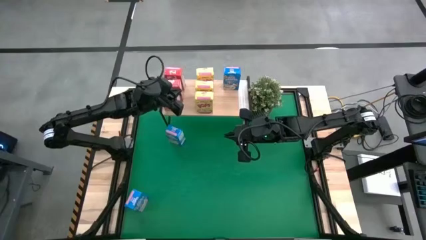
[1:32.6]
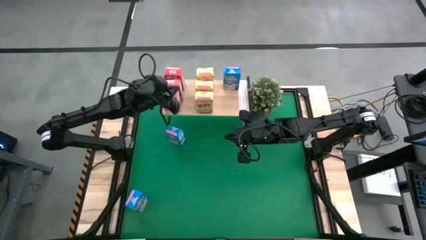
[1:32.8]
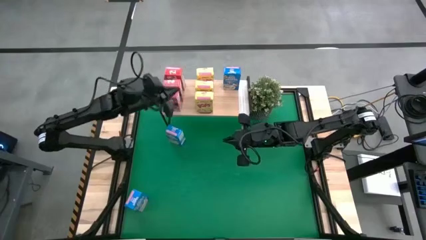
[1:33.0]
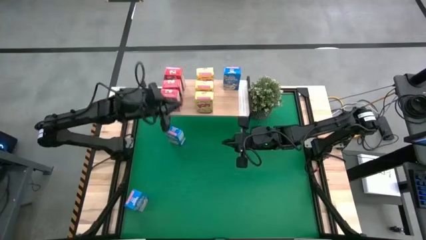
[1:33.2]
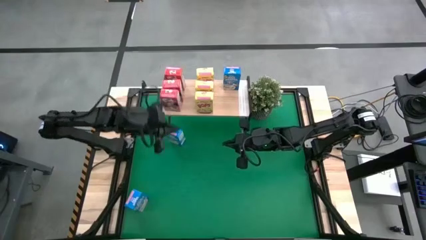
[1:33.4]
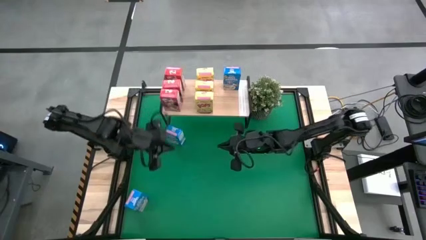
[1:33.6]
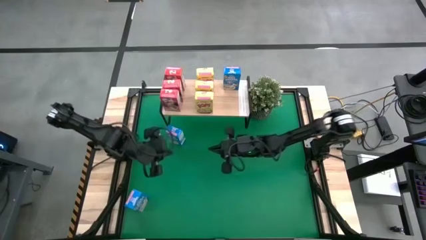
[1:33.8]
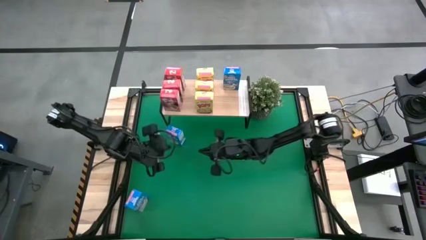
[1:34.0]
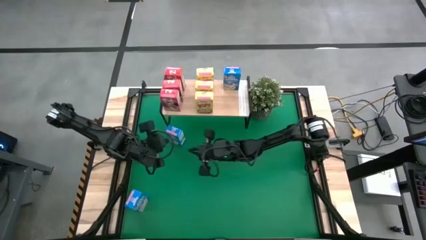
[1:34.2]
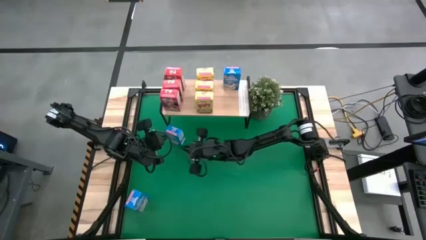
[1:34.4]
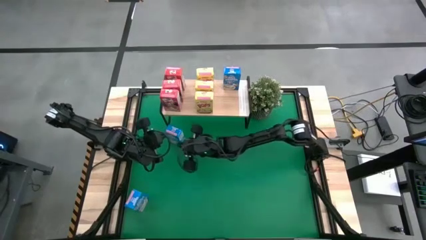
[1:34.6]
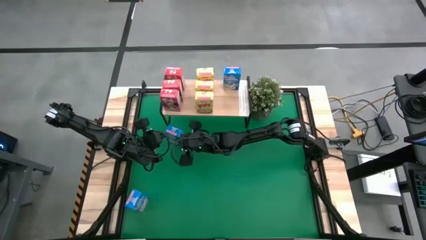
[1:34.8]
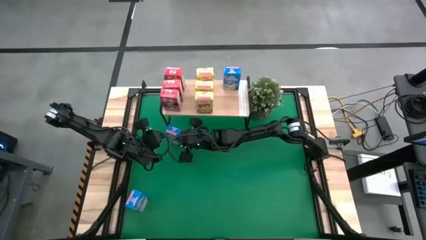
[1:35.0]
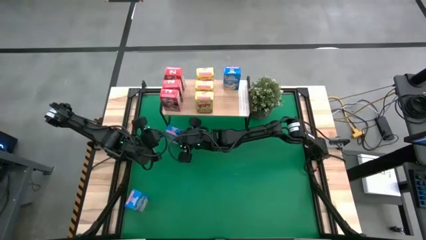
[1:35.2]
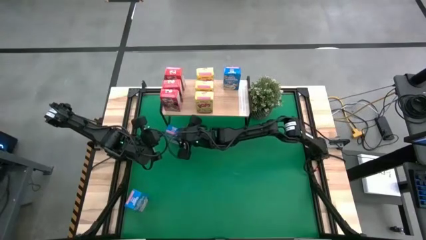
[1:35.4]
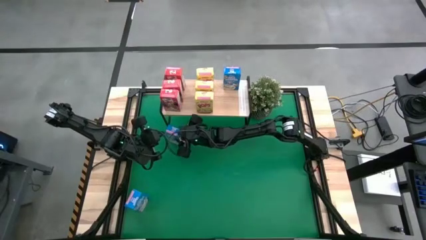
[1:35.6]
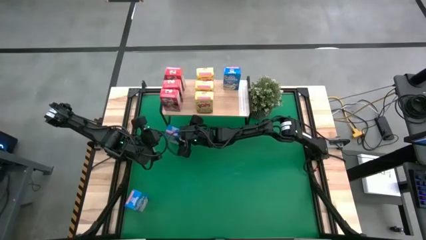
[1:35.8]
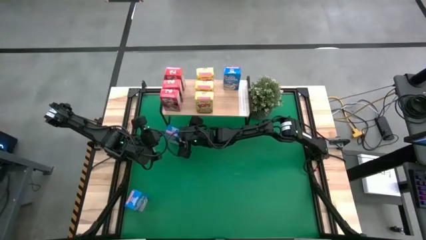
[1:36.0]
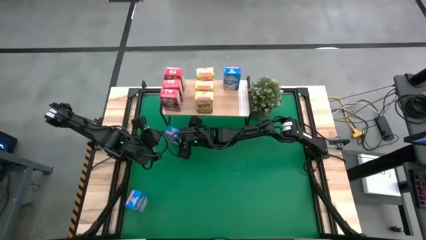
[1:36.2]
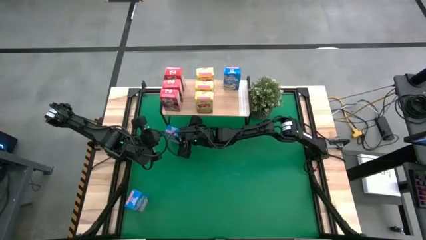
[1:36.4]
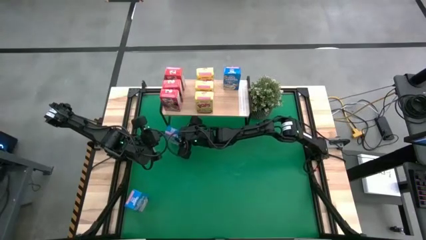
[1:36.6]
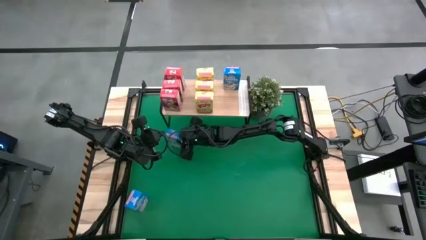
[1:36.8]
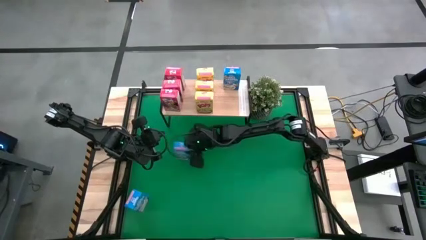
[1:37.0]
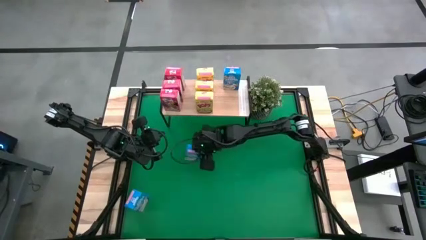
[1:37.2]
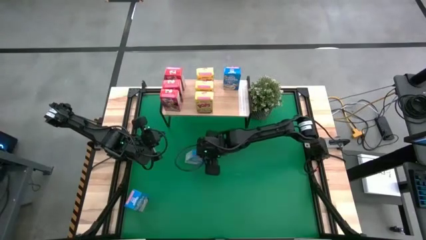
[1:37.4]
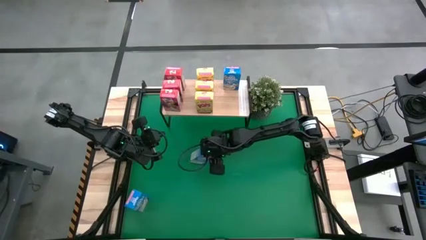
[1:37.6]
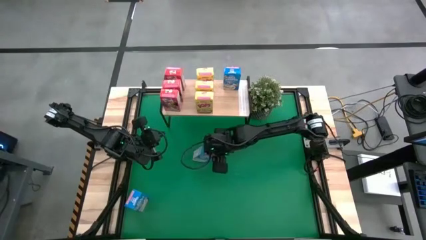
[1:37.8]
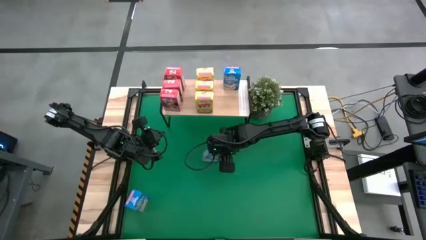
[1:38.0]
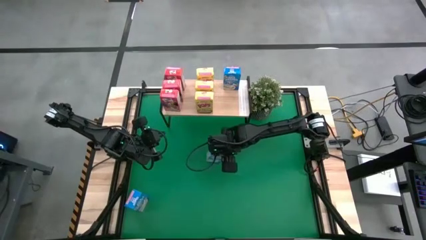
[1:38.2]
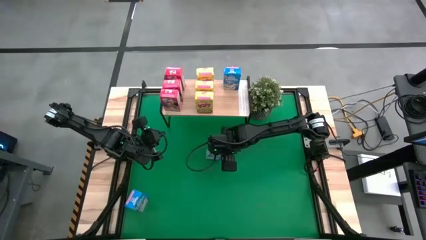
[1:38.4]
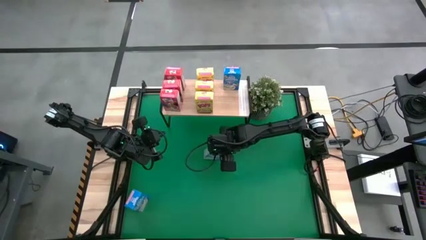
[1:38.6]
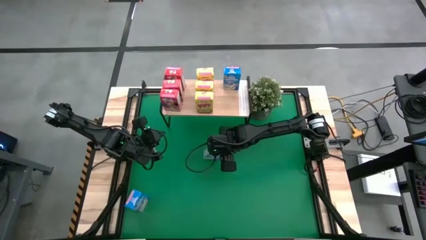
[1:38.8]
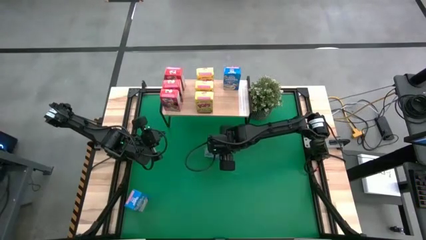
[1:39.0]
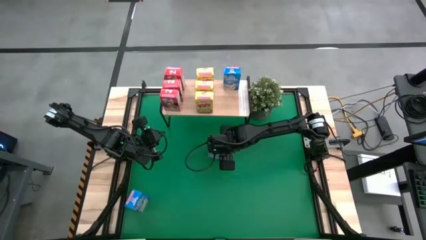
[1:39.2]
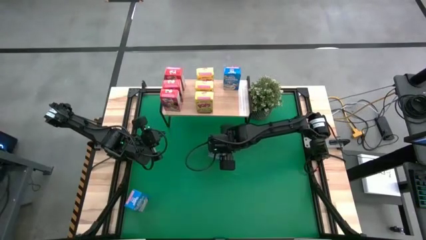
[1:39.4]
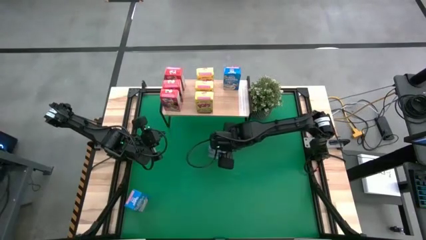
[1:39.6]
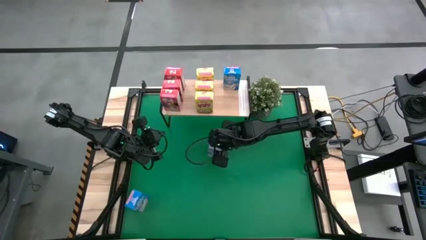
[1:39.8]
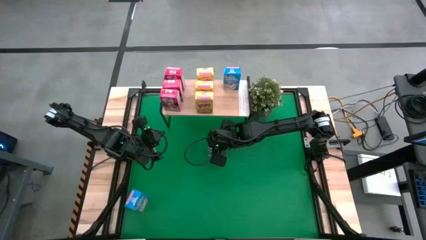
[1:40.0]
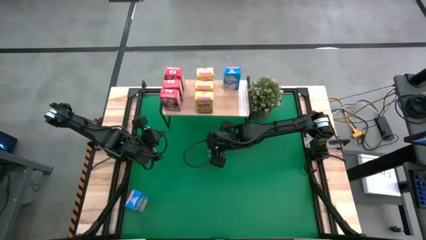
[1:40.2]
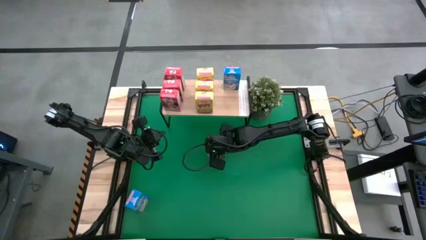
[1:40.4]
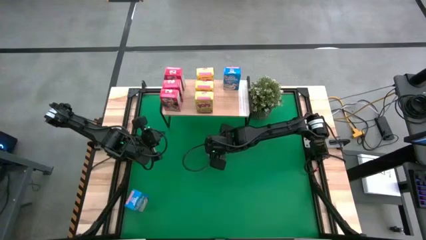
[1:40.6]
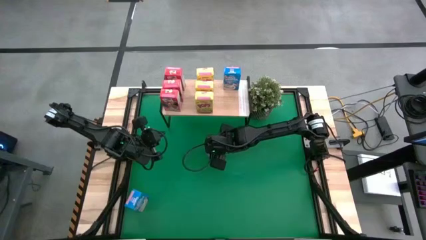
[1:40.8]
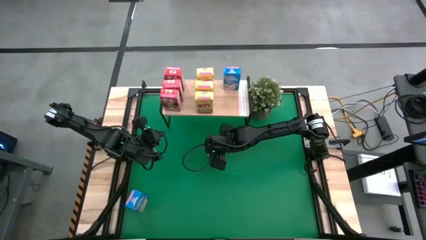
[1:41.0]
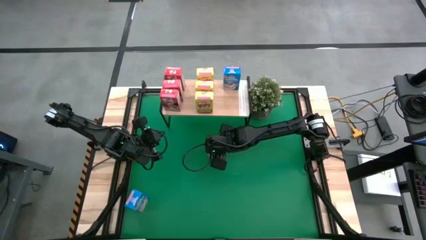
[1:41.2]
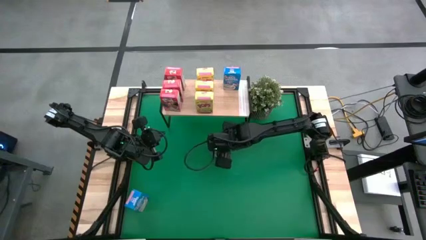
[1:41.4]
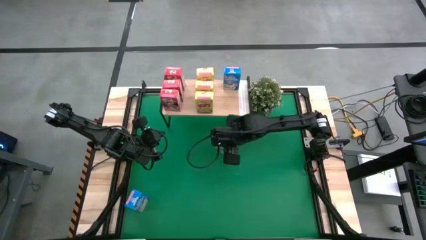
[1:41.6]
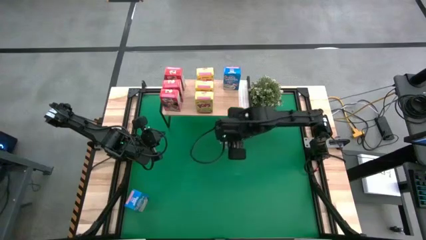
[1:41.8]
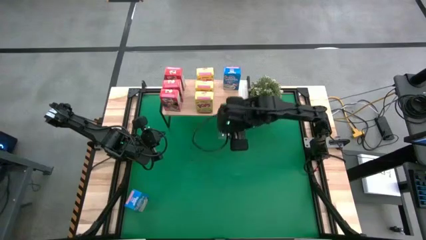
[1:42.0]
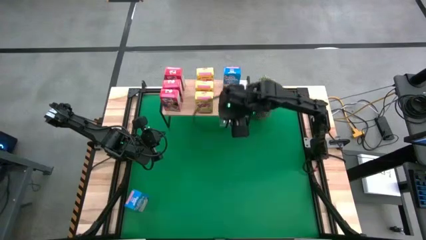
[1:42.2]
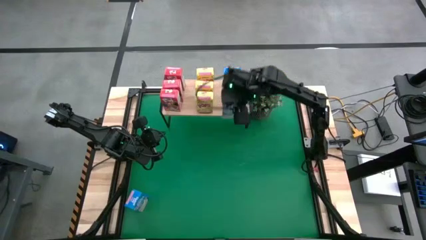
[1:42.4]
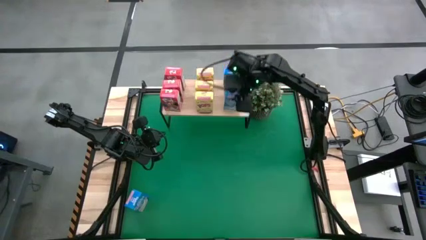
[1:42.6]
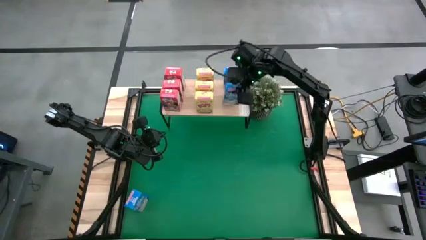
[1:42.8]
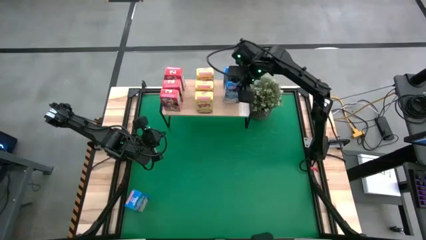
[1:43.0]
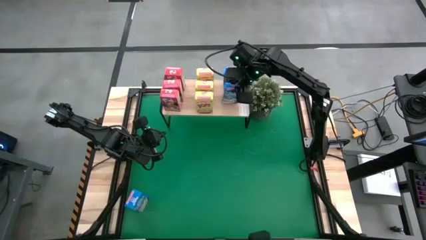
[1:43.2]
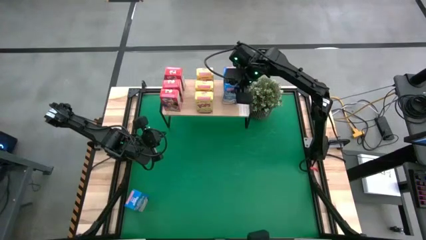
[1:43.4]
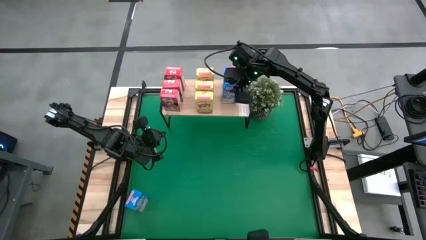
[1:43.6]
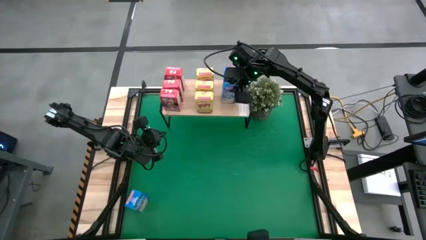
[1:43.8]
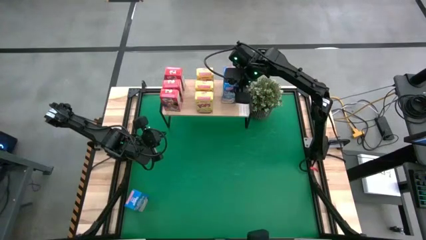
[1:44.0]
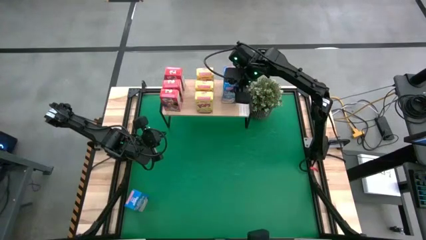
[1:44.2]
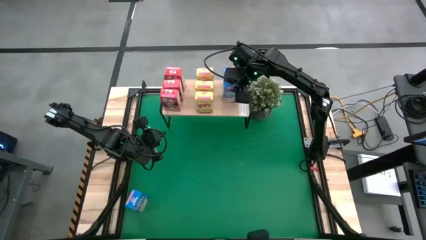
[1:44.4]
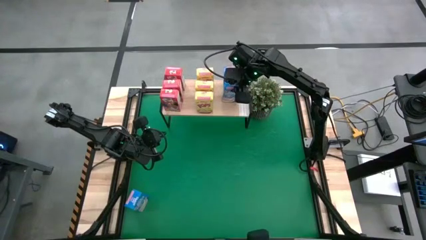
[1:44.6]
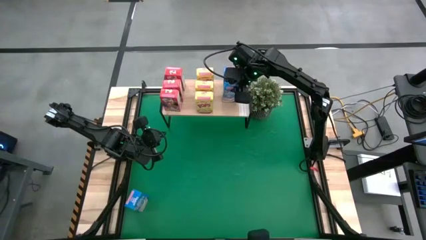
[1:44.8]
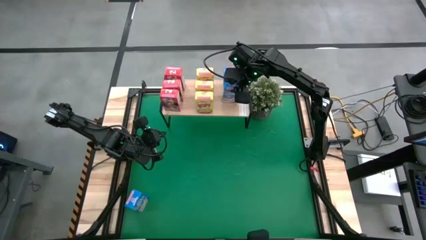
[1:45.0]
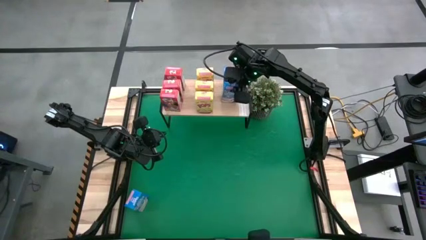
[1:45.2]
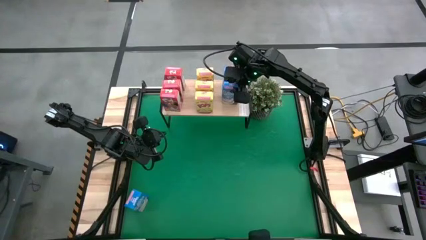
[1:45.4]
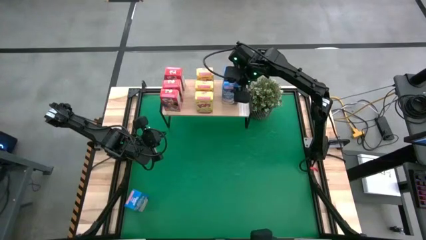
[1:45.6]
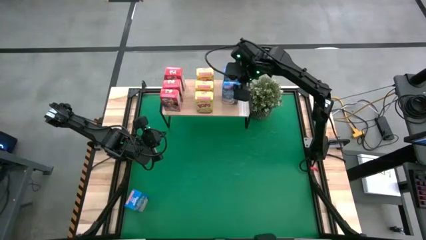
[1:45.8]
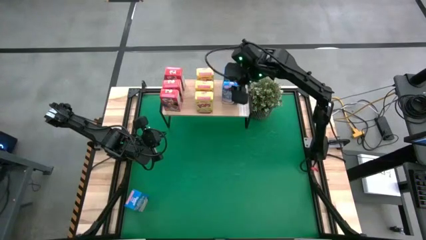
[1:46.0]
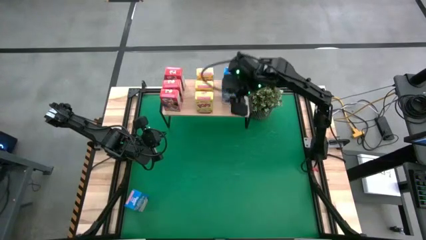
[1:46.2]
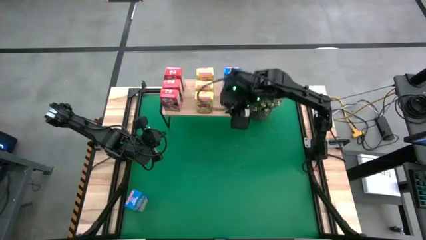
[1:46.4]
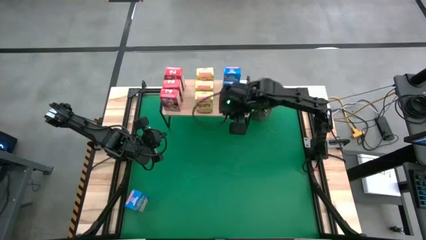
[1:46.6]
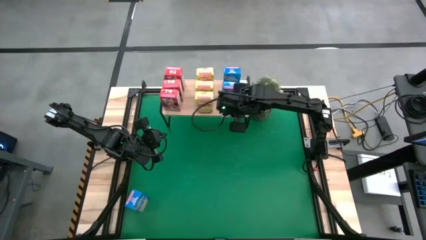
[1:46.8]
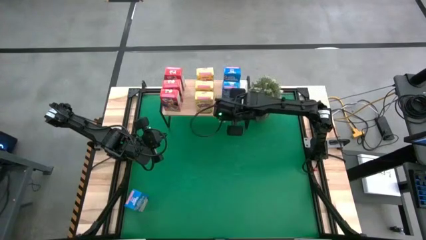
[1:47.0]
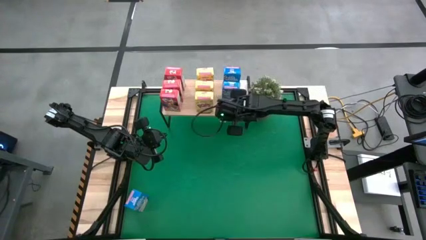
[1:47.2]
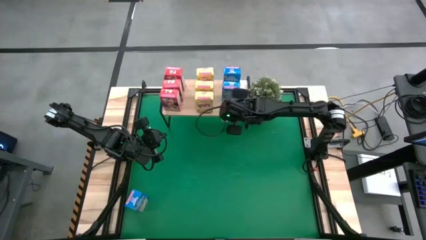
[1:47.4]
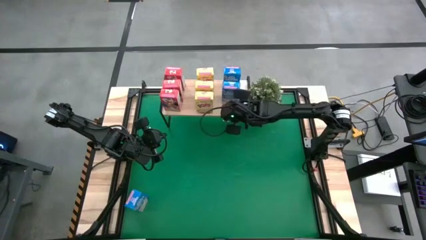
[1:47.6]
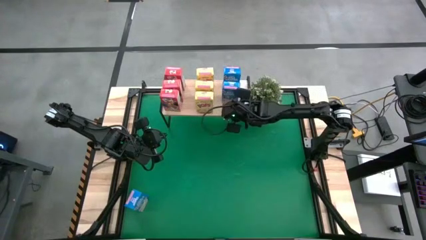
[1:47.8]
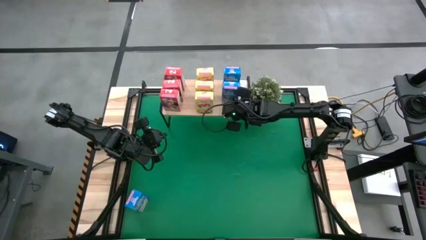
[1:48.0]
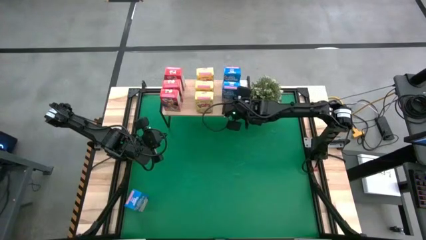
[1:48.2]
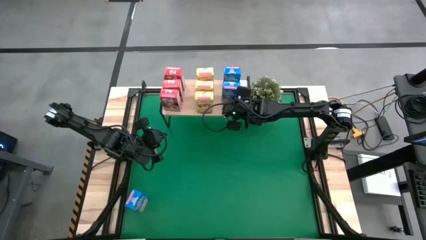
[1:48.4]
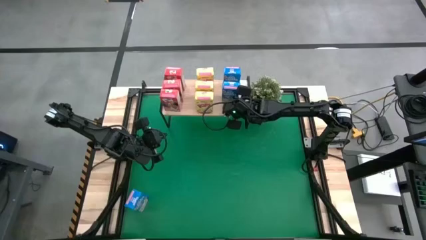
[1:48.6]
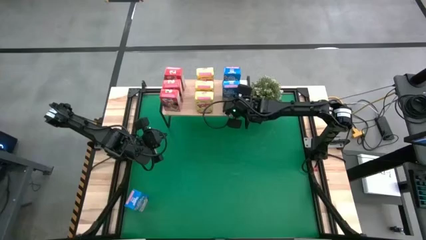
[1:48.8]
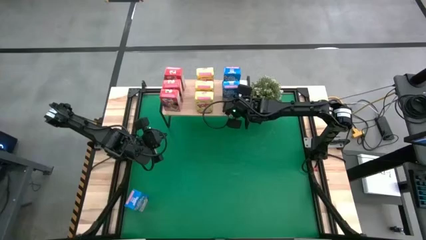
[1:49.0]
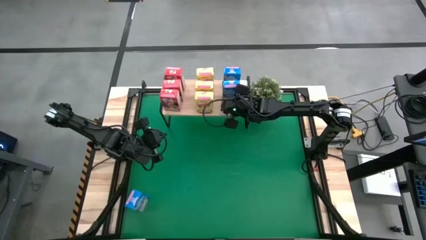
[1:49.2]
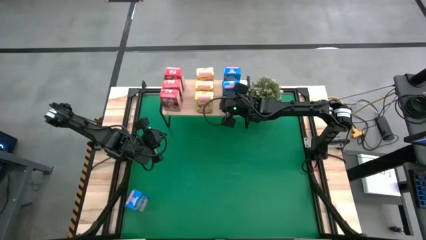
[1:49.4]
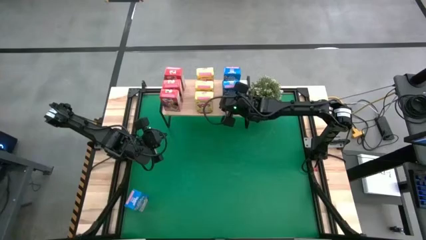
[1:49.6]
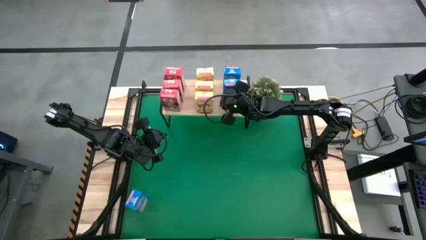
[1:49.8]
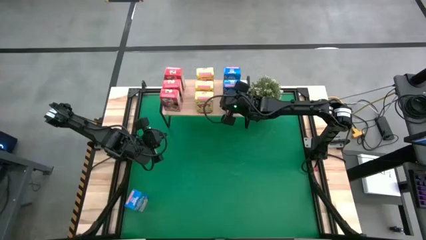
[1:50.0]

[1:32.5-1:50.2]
Task: Stack cereal on shelf
Put the top blue cereal box on the shelf aligned with the other blue cereal box
